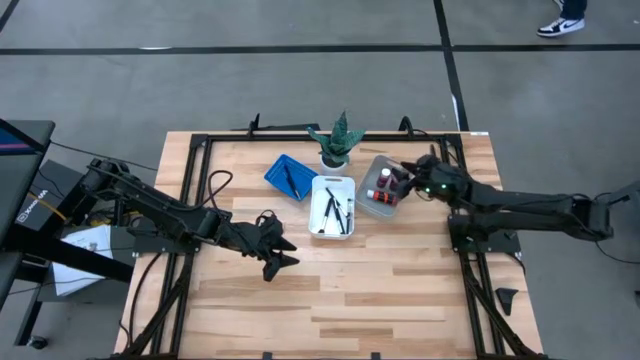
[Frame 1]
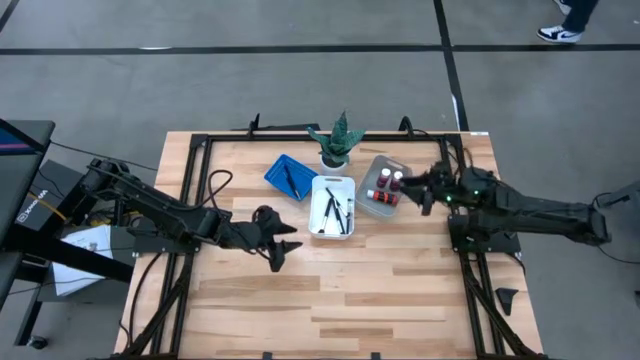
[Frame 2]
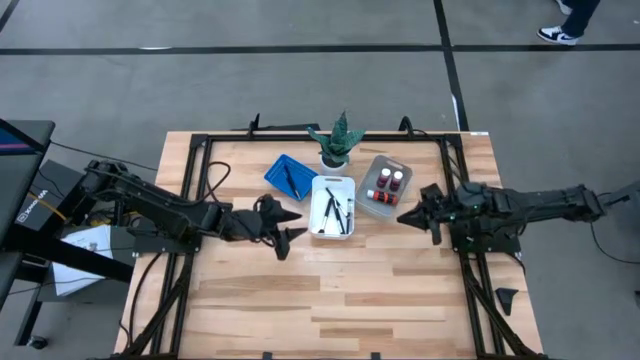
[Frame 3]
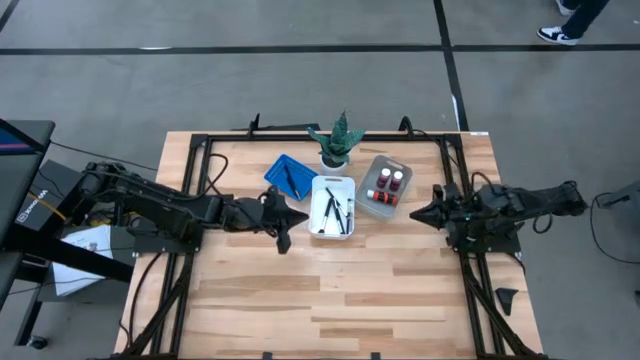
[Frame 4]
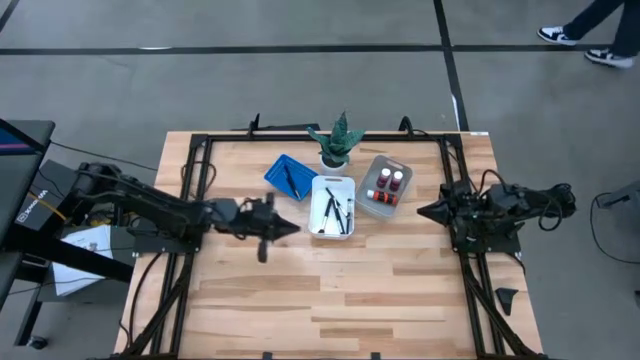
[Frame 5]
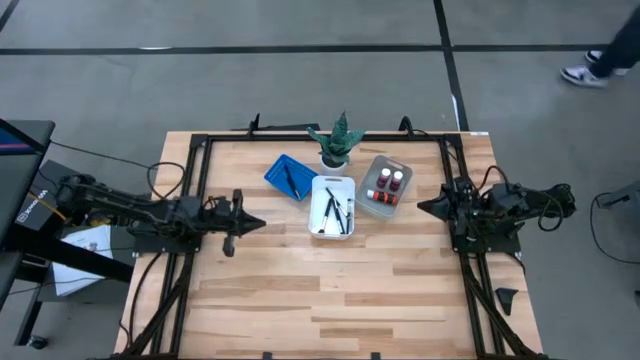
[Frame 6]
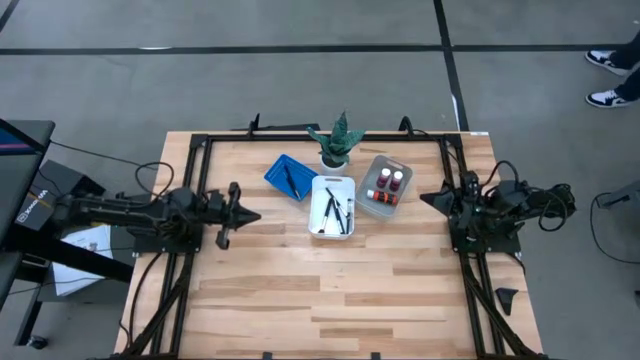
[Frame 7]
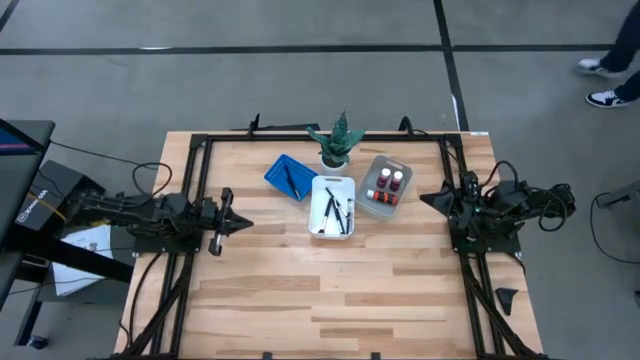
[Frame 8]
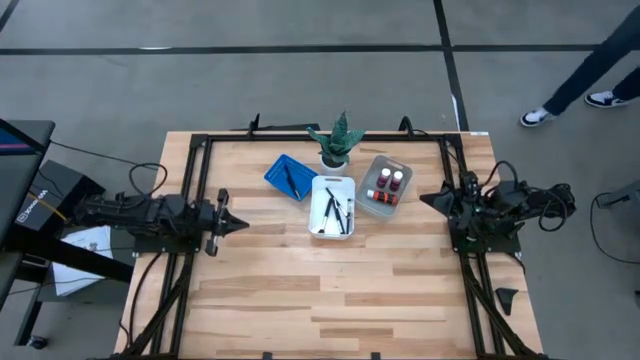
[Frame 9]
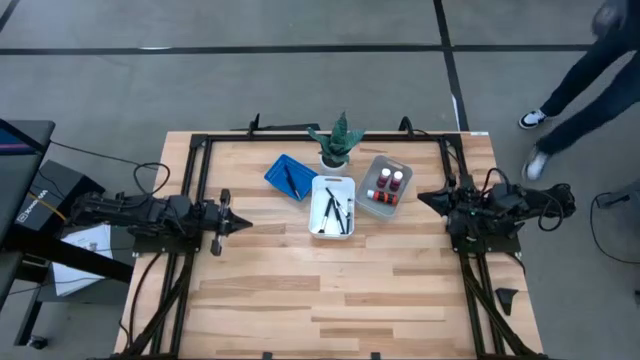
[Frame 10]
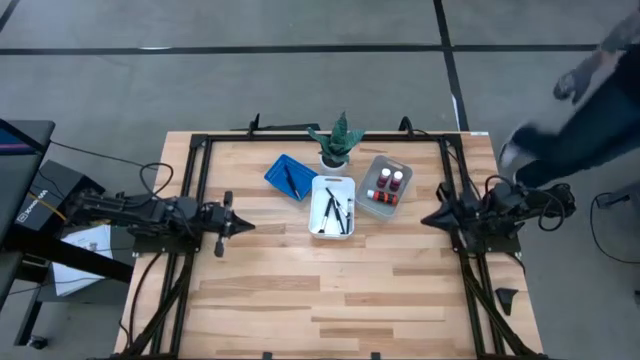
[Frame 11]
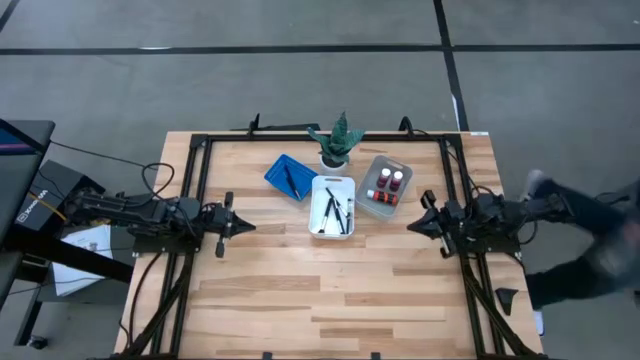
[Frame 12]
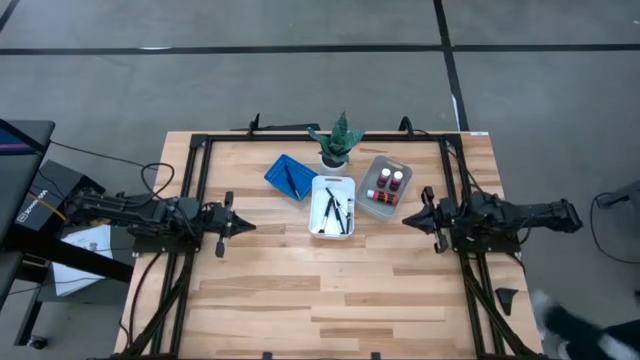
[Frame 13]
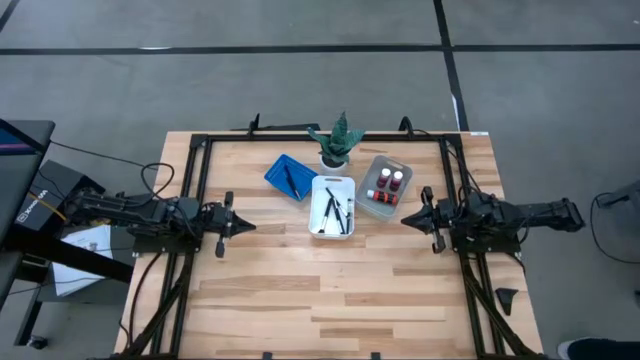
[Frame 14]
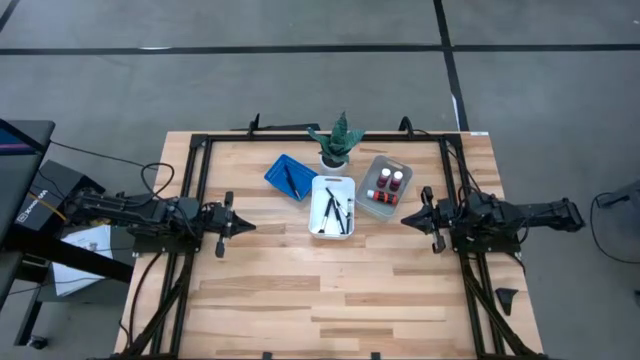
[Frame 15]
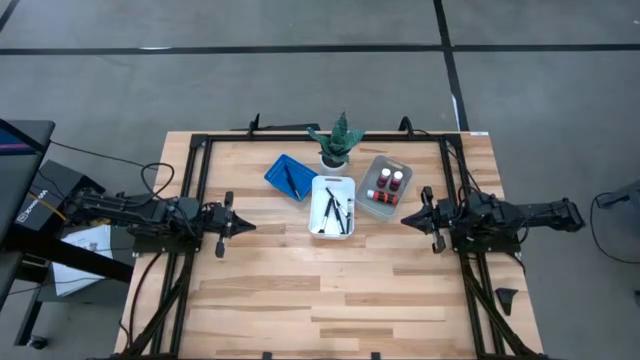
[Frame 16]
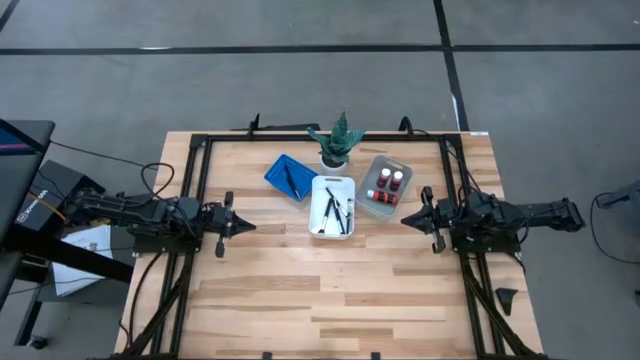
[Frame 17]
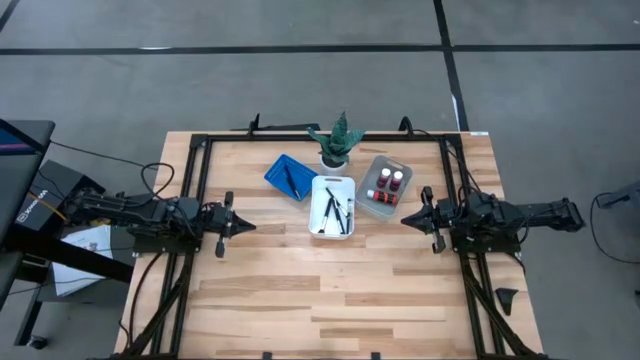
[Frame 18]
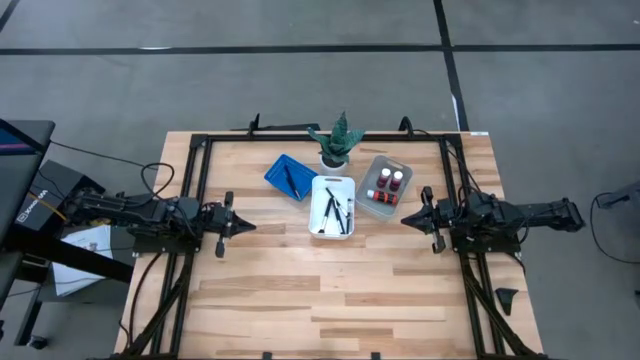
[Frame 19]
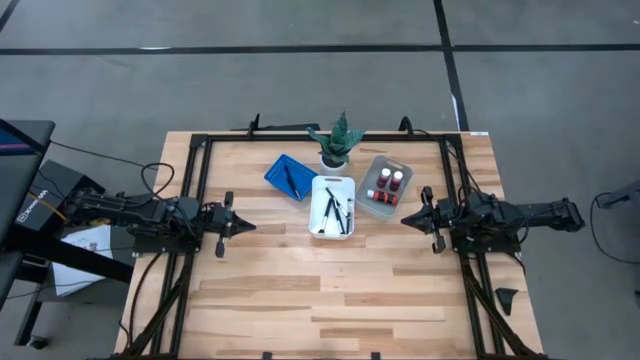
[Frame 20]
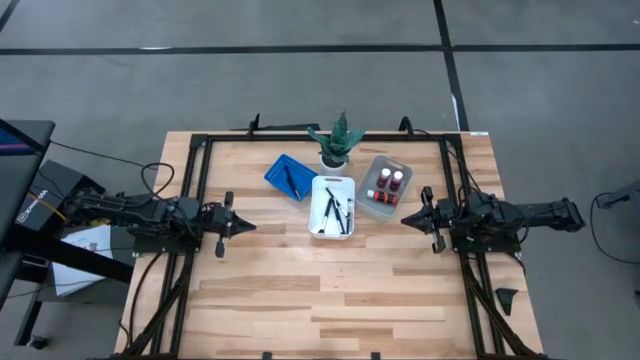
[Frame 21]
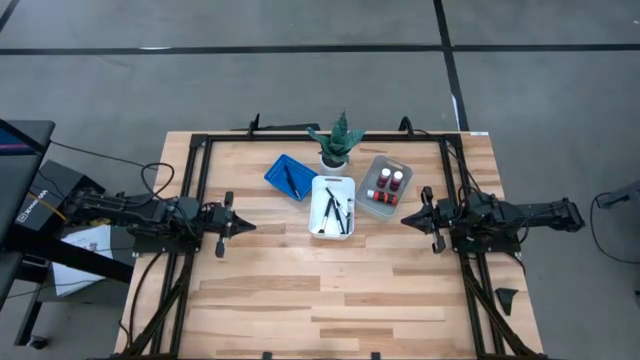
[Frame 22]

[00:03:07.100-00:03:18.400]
Task: Pick & Place Paint Supplies
Return to Home Position

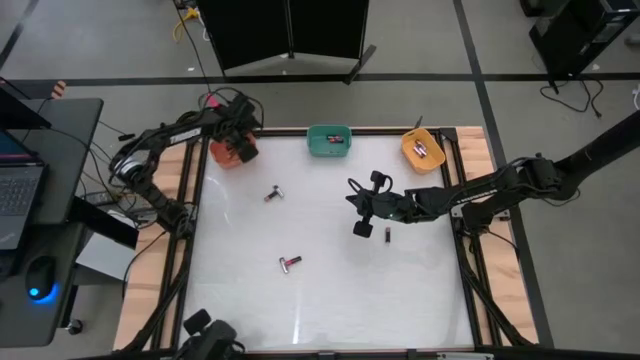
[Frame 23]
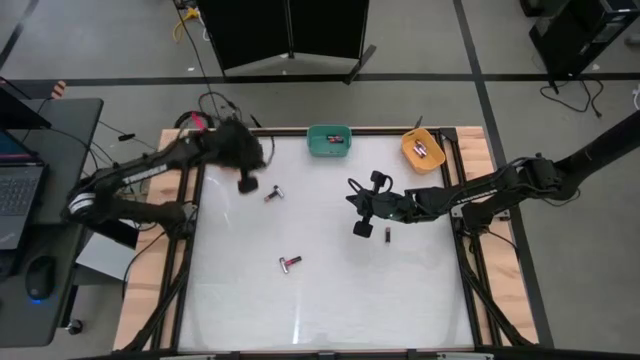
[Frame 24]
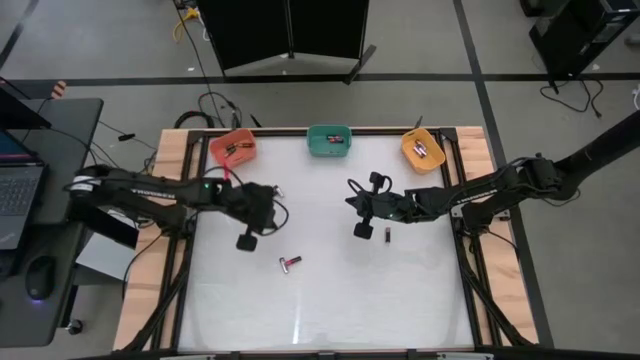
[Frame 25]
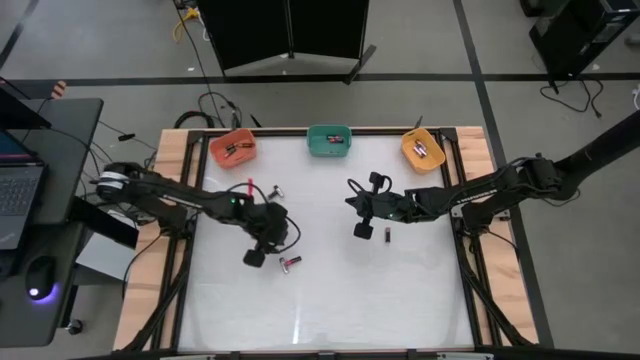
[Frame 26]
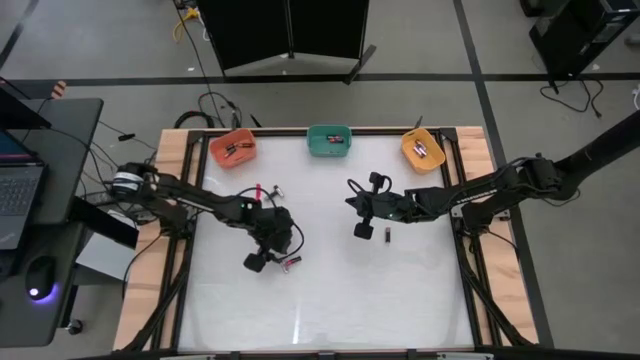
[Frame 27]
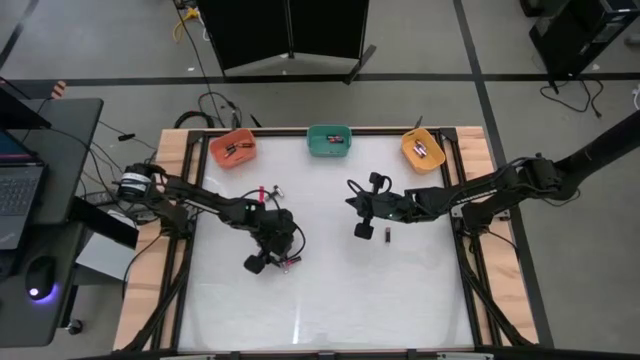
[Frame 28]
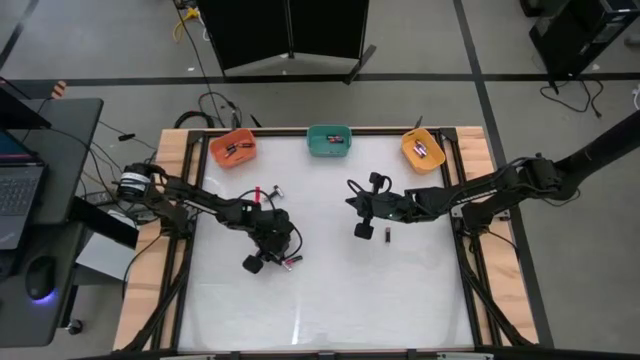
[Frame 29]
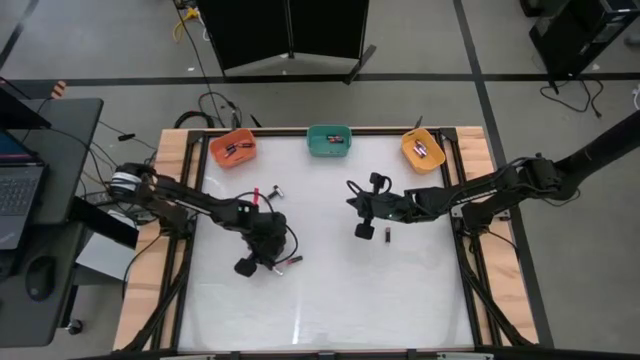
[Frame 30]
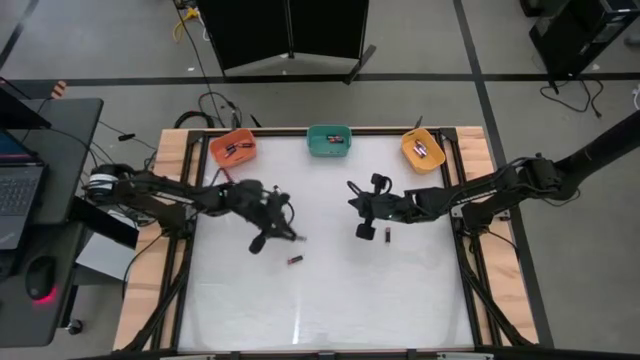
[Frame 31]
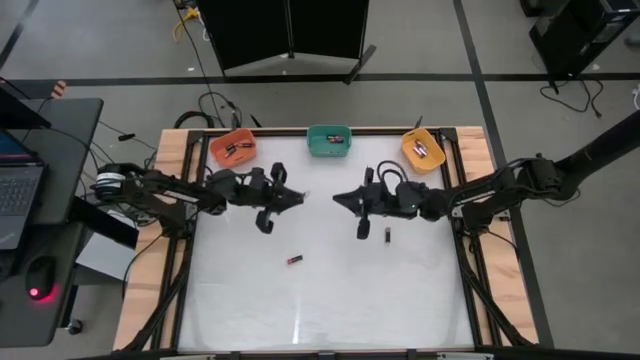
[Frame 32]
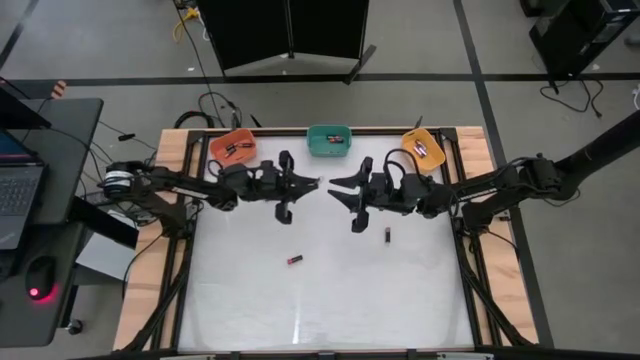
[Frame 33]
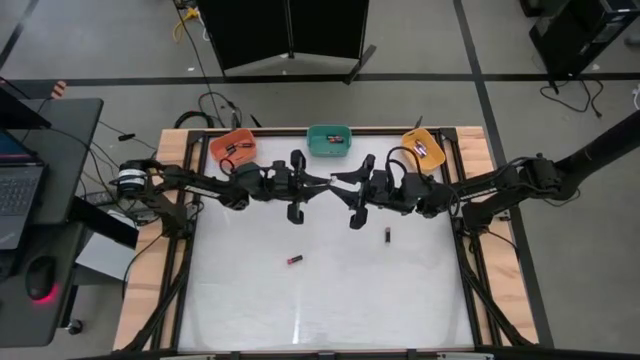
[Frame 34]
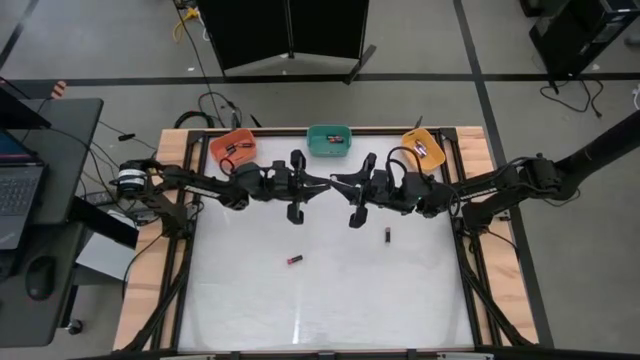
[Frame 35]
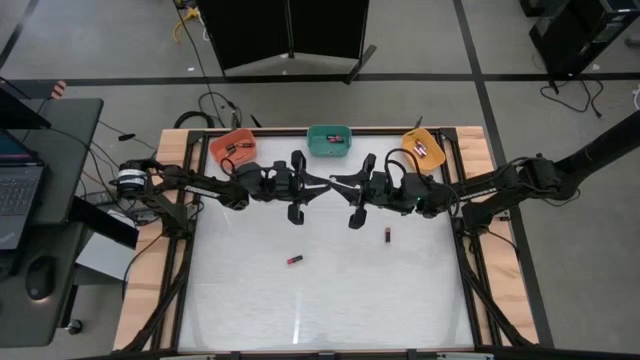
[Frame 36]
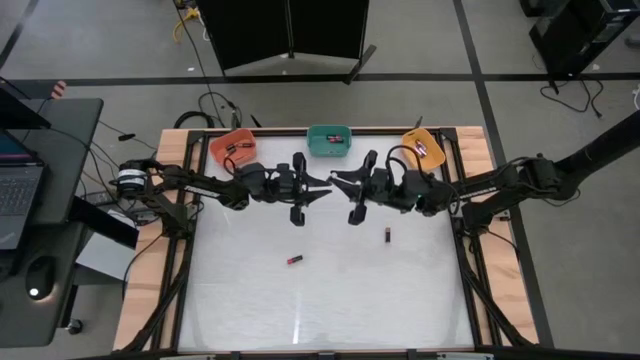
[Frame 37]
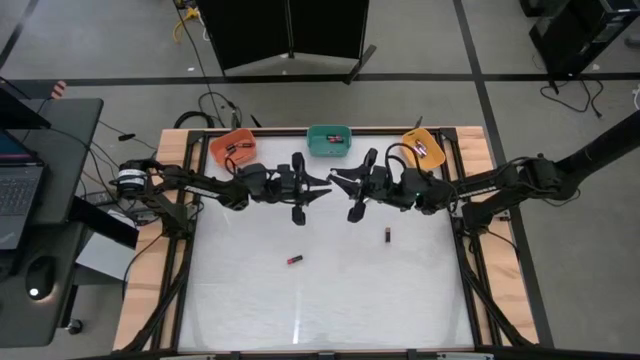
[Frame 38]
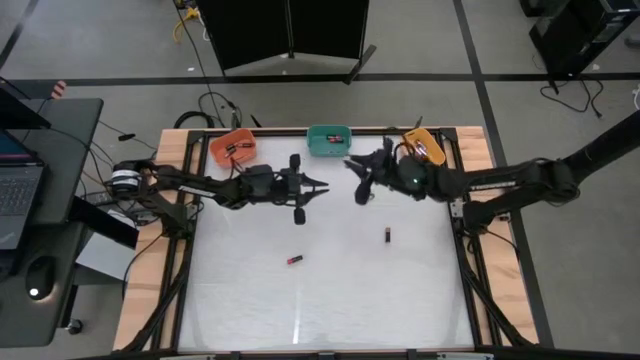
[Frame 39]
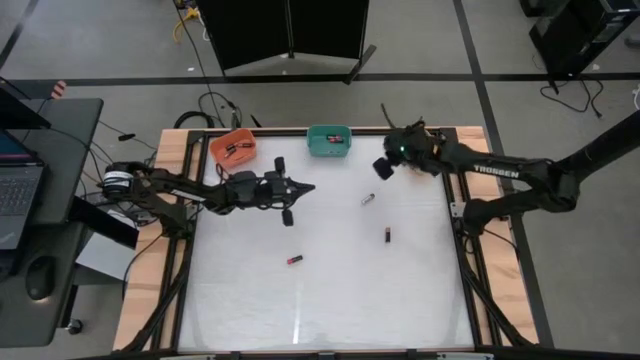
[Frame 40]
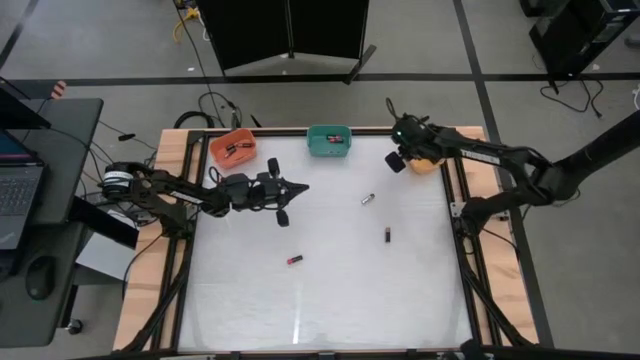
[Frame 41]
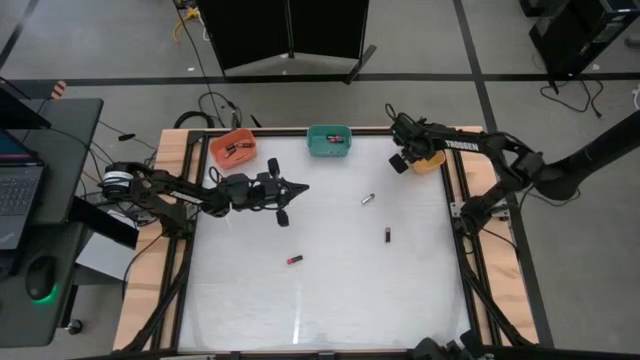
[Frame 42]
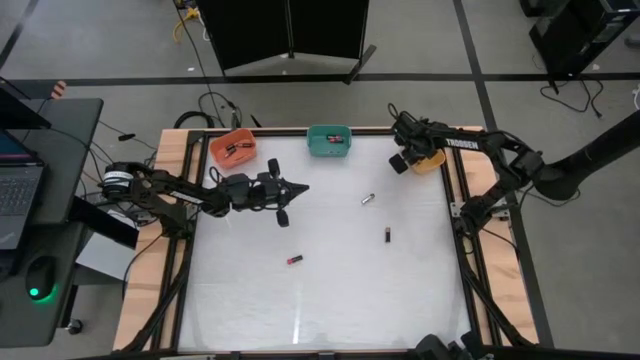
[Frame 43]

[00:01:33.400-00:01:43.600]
Task: Sort batteries
Put the silver battery into the yellow bin
